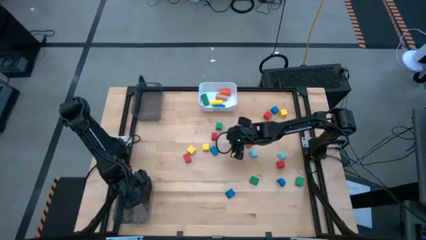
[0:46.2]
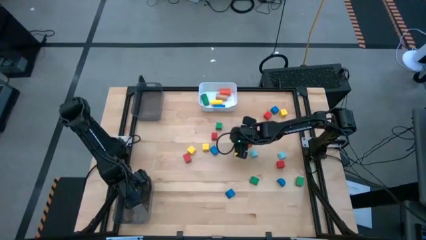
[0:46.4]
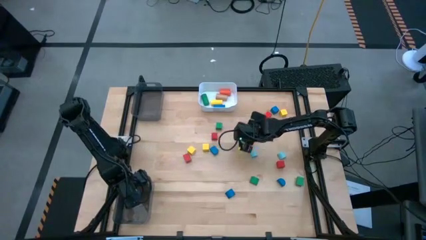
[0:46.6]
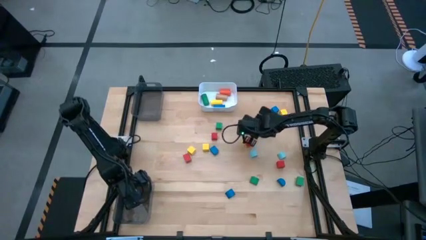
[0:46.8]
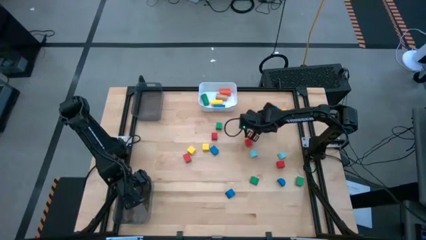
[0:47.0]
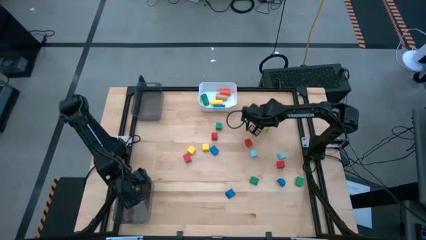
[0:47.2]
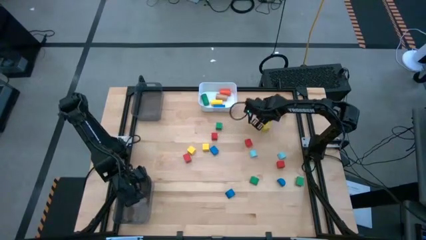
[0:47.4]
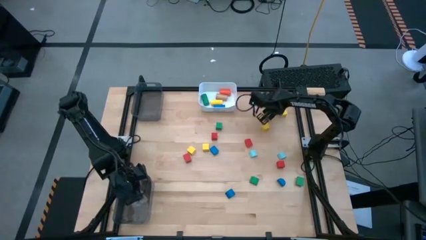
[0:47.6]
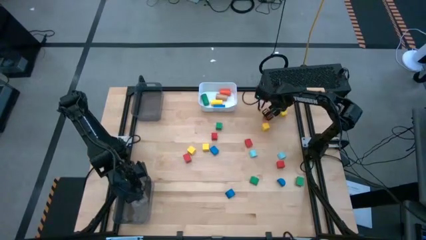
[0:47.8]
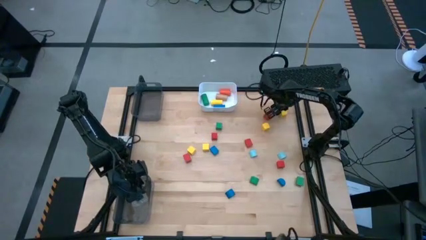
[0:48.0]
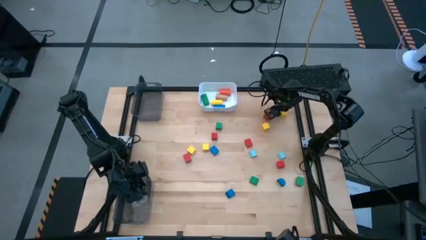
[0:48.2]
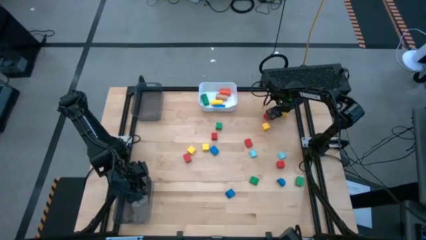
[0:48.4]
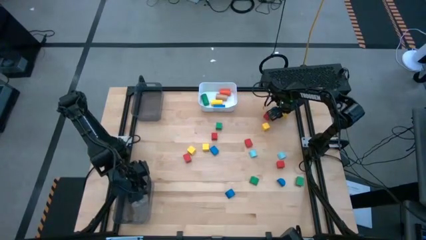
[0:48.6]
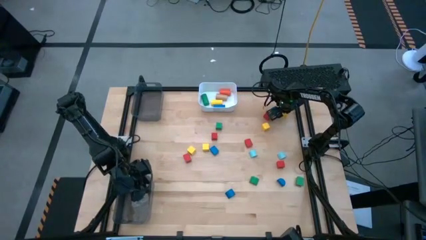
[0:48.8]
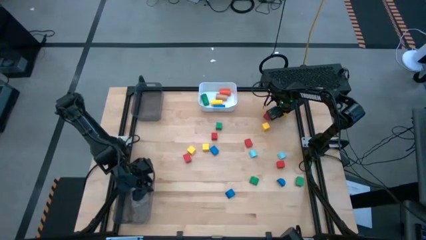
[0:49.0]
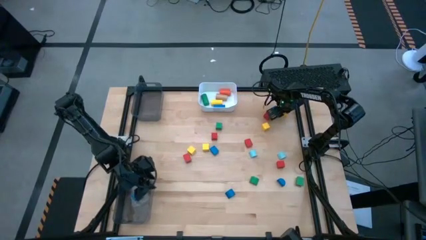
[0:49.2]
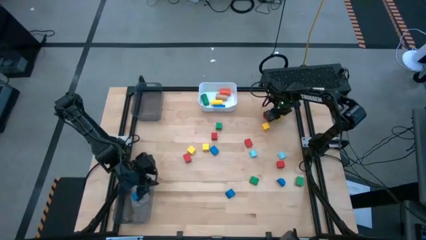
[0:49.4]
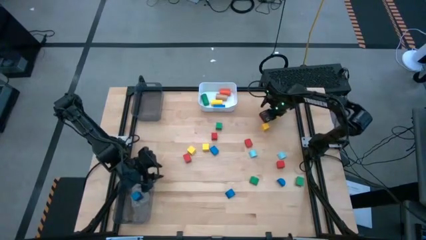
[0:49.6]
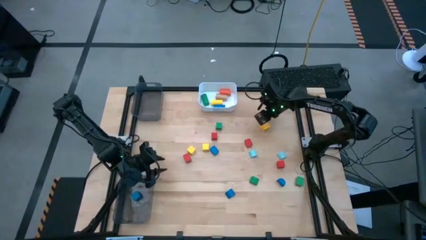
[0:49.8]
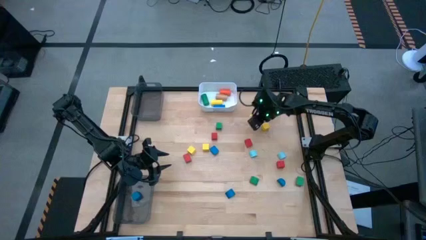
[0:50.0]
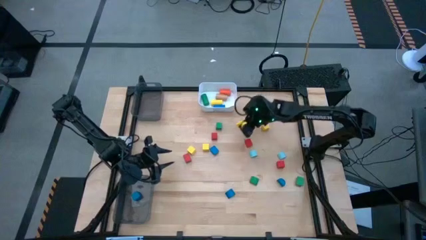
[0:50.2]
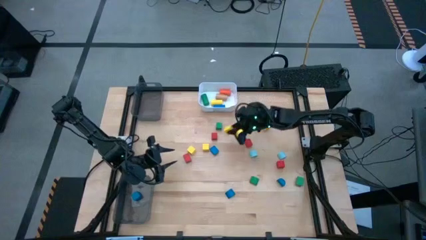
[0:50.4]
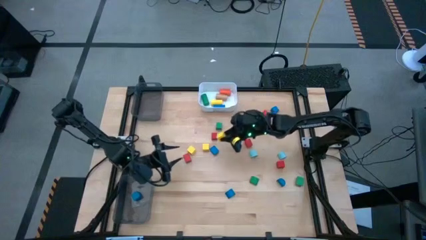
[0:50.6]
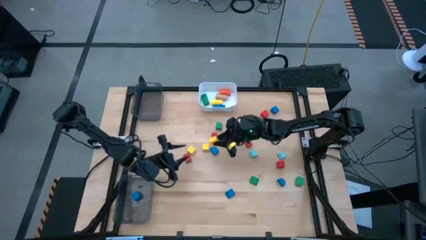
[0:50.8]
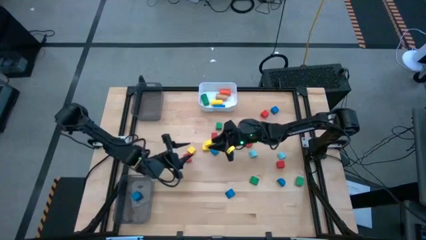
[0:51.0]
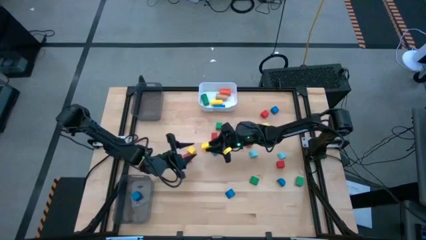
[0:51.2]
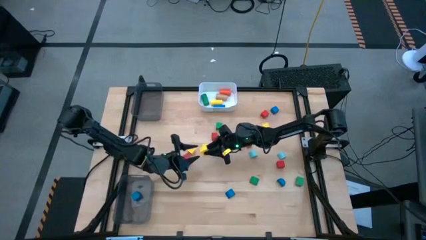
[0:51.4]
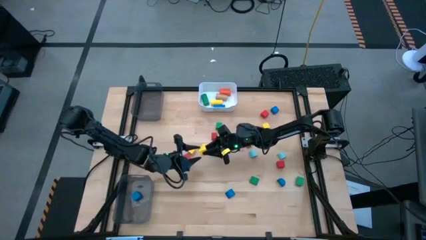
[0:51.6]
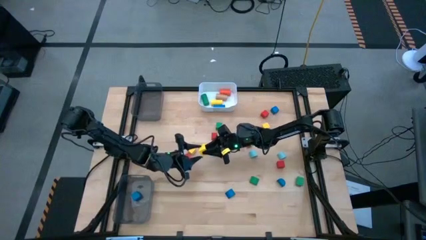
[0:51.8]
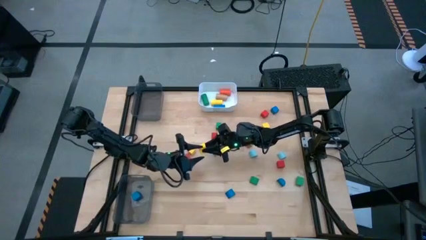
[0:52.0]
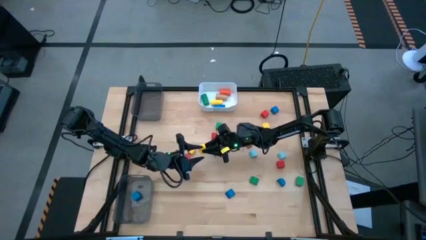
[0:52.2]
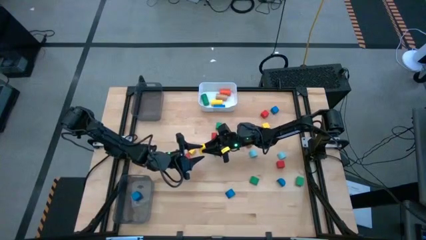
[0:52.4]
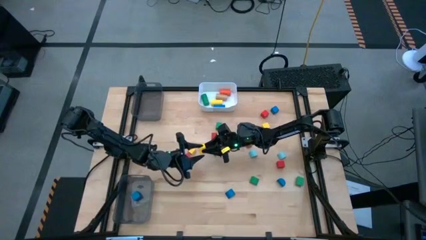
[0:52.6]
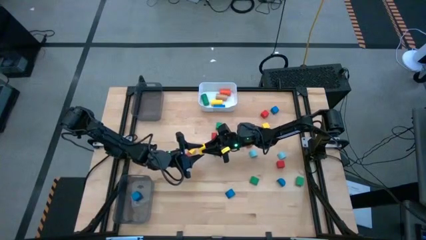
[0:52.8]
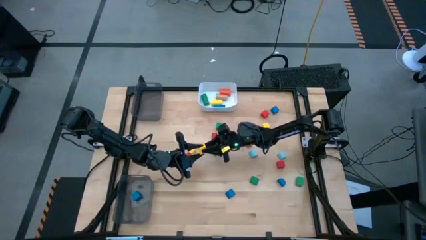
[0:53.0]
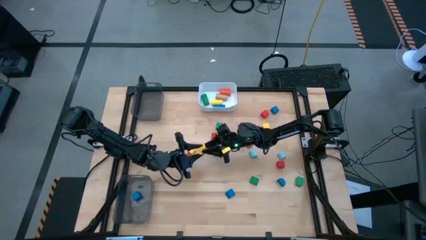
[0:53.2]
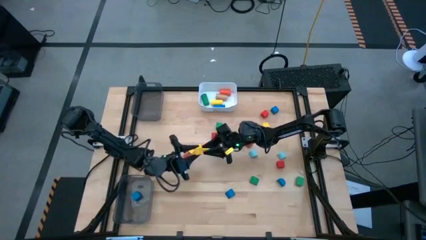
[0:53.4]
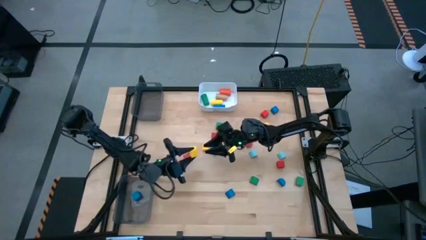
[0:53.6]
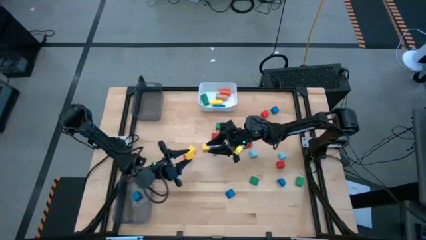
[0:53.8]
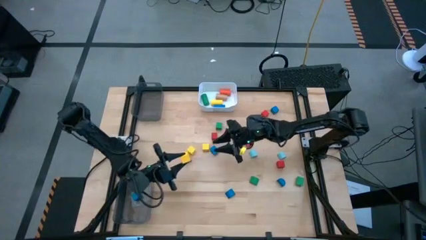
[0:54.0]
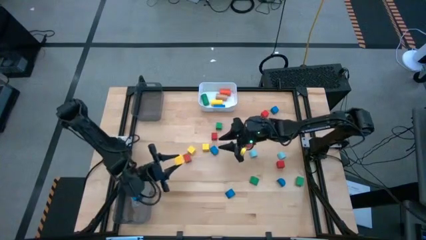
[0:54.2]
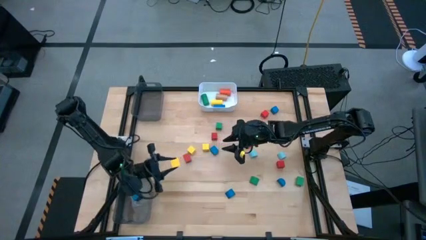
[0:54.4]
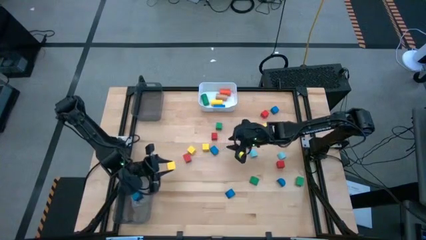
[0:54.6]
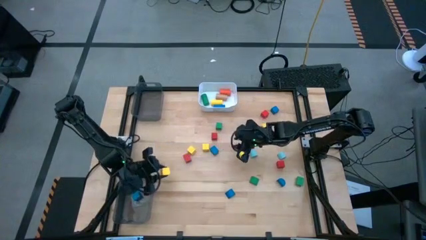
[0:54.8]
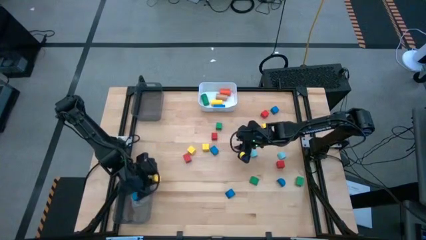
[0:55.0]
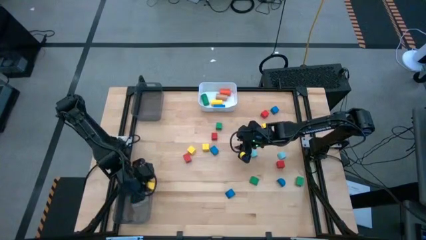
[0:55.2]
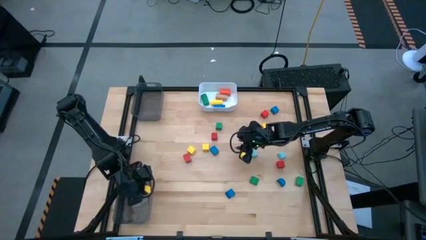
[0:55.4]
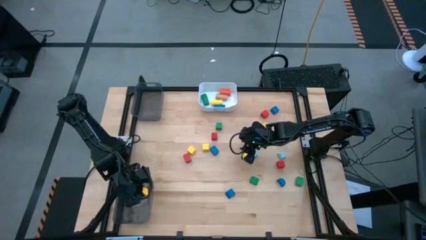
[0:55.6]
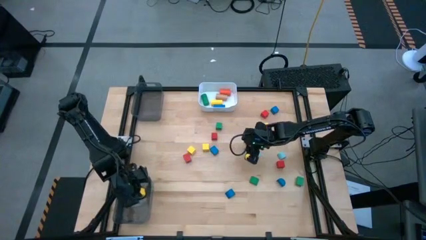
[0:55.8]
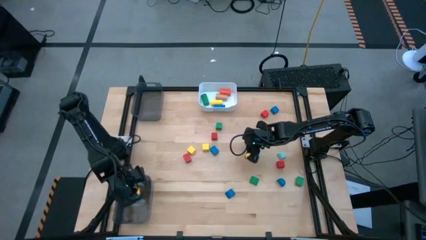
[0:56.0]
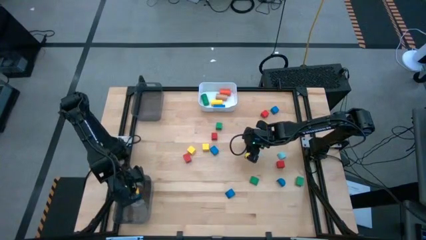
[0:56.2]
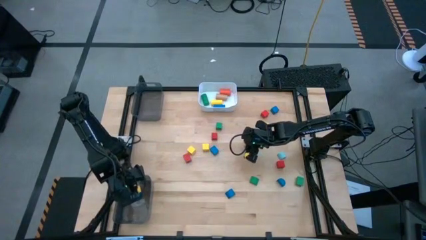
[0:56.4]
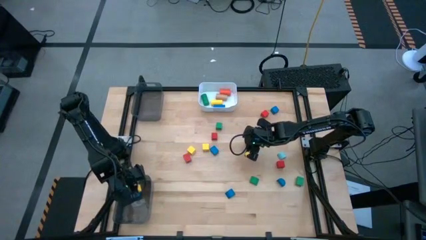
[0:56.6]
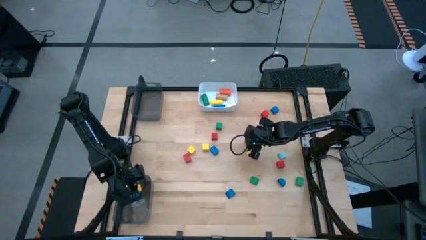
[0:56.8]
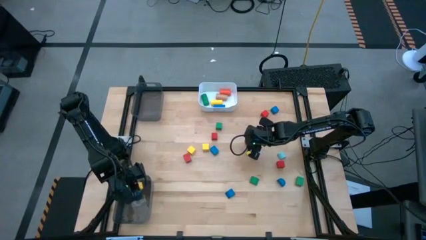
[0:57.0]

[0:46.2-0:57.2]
Task: Sort blocks by size
Put the yellow square block into the bottom black bin

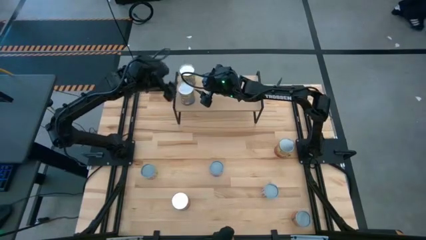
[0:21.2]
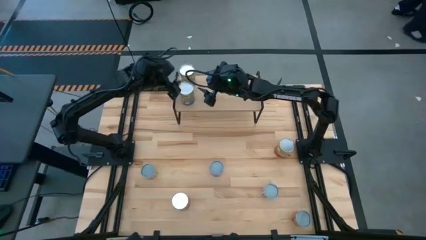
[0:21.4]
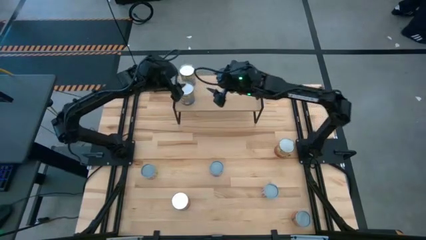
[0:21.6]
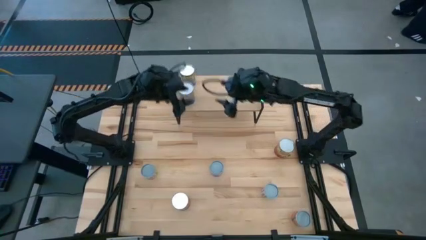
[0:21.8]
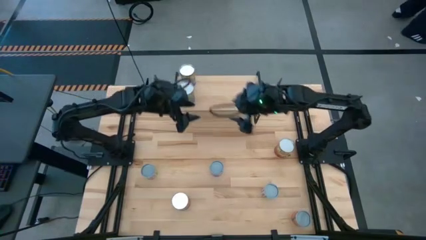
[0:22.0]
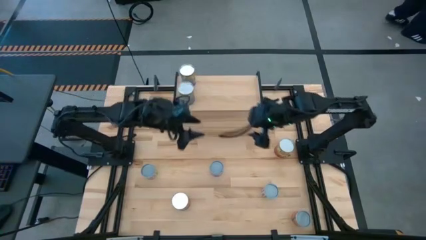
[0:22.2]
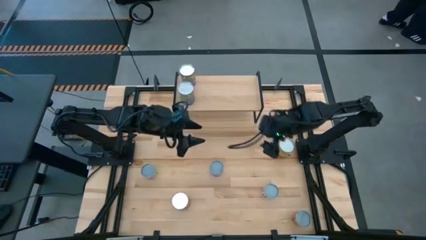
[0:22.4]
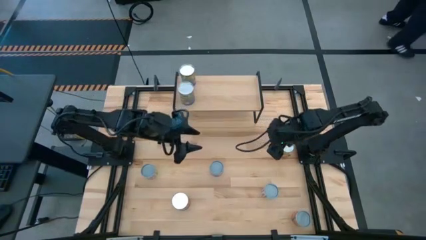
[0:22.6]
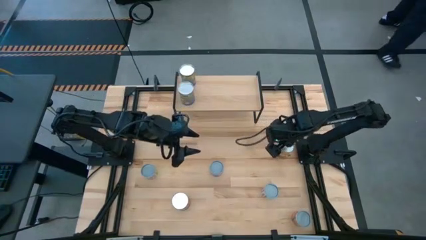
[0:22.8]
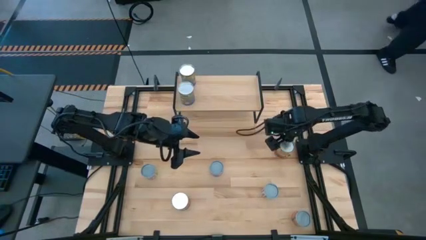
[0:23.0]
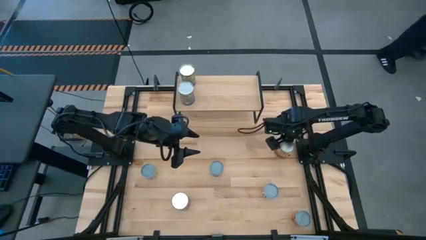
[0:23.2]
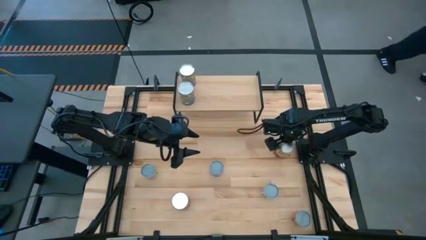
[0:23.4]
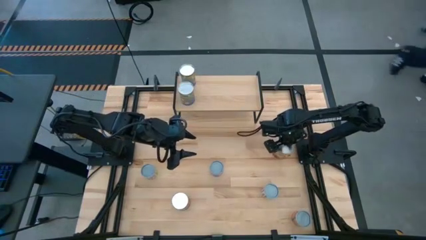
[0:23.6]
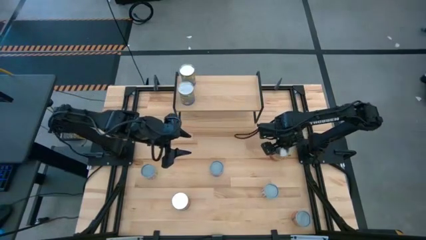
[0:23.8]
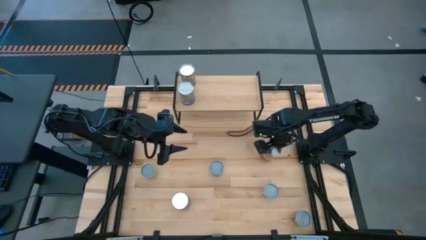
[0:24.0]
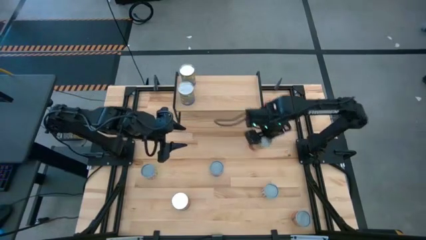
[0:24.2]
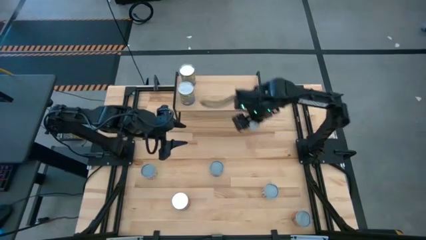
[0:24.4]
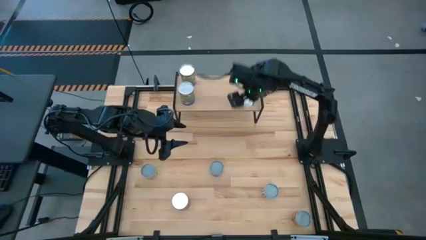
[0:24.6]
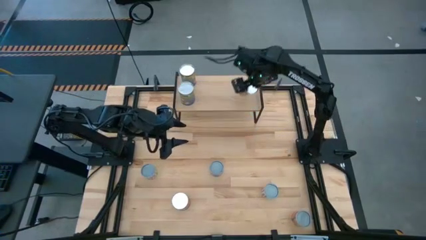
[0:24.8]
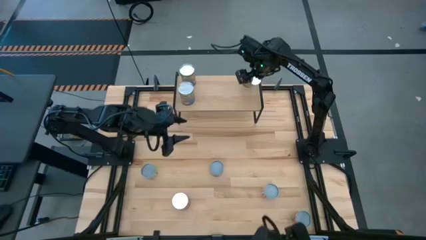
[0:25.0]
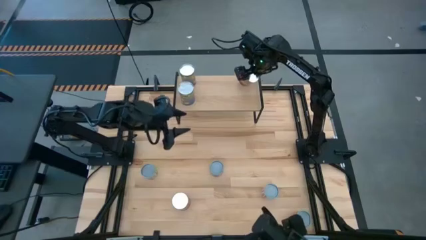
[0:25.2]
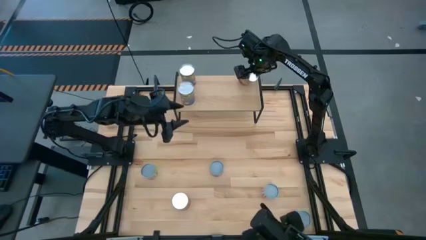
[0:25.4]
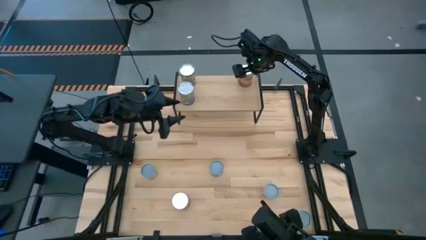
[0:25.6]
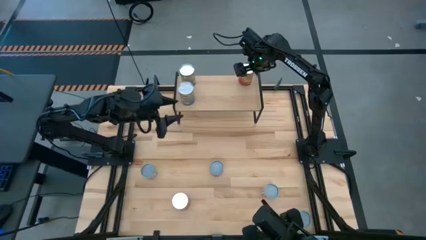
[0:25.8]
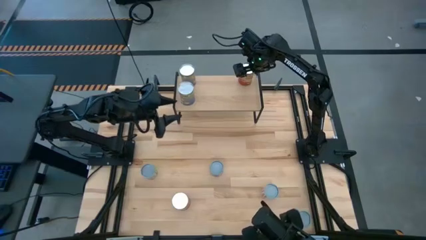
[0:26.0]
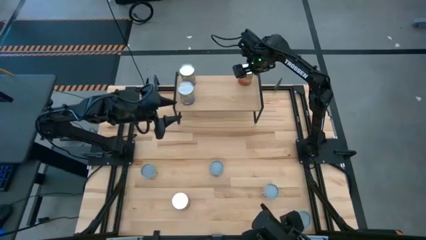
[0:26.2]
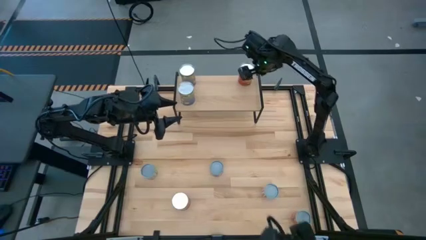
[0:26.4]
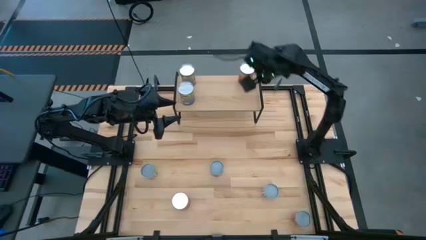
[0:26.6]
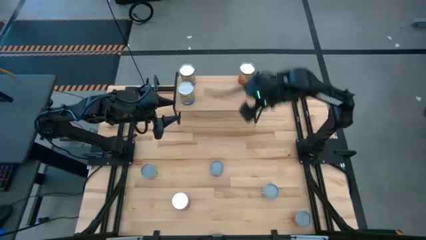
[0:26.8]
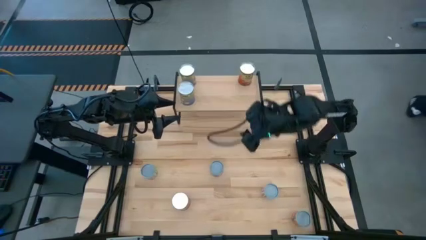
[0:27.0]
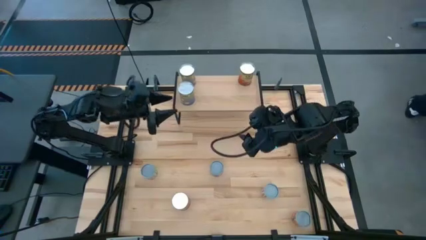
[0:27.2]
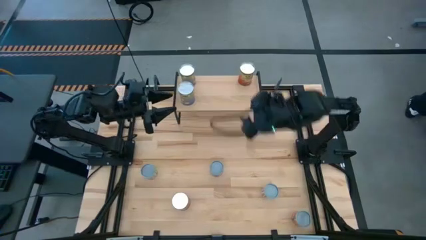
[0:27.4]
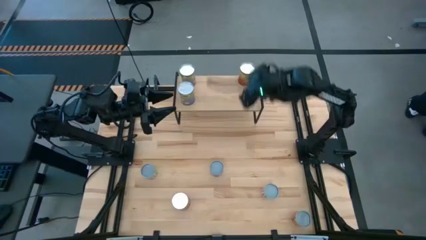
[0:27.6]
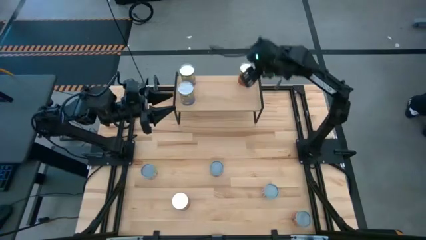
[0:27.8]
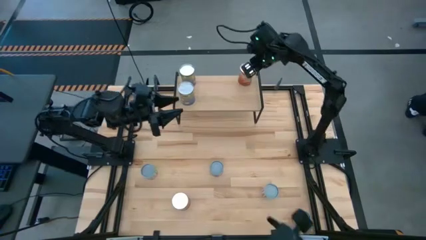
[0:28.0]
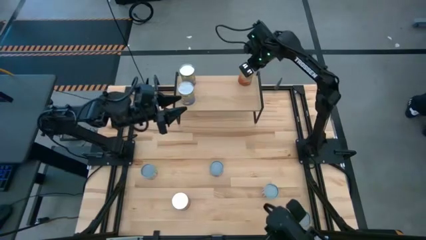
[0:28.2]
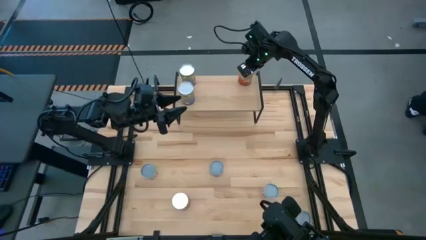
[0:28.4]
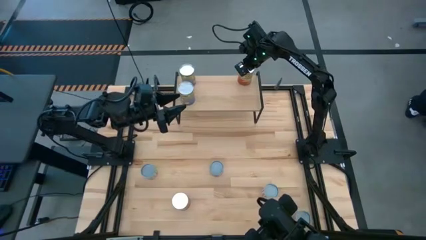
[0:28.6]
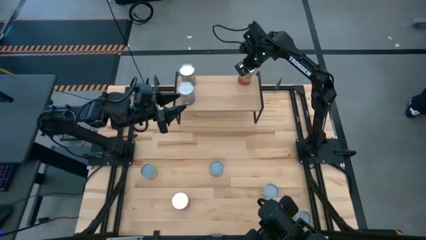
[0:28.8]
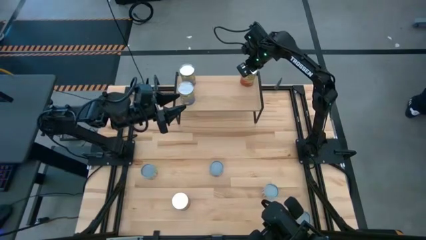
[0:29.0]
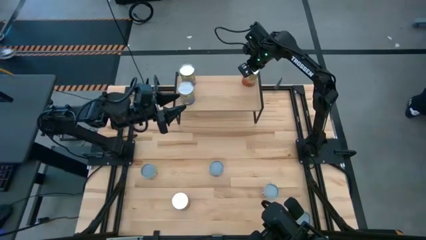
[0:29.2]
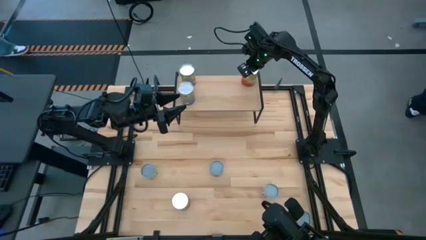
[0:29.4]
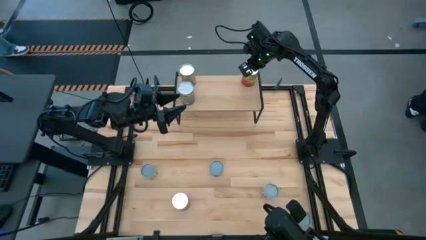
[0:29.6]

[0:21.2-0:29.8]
Task: Pick and place cans onto a shelf
Put the top canned corn on the shelf
